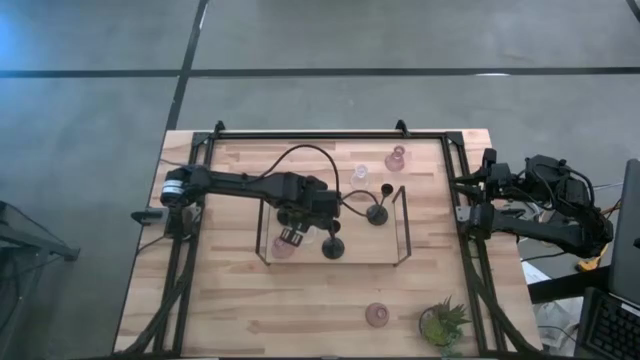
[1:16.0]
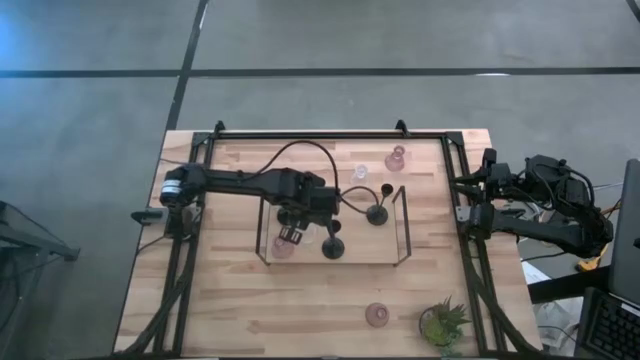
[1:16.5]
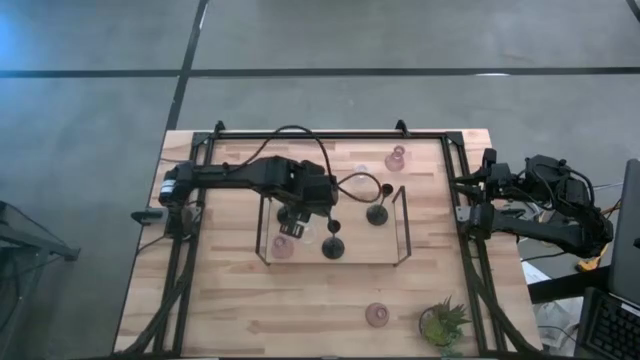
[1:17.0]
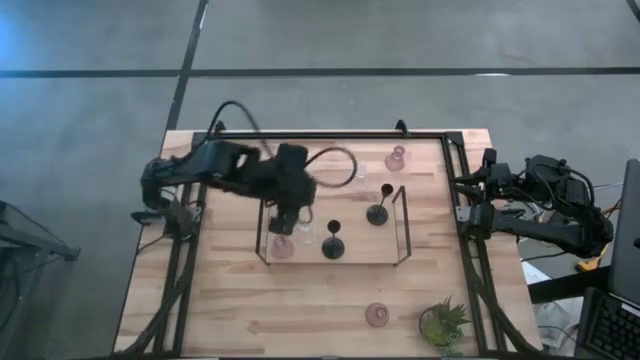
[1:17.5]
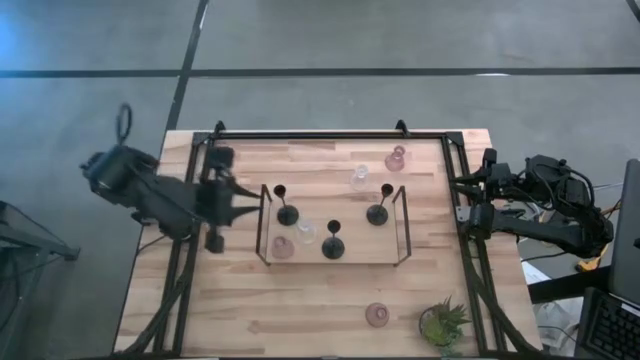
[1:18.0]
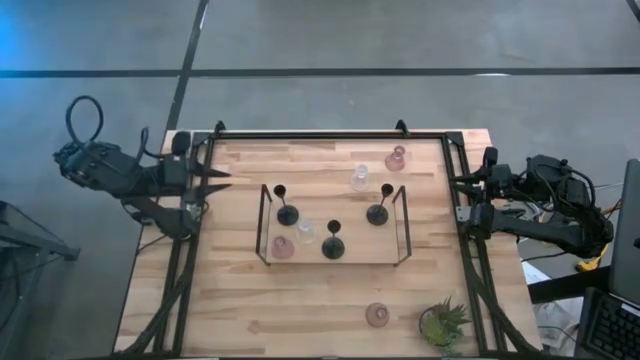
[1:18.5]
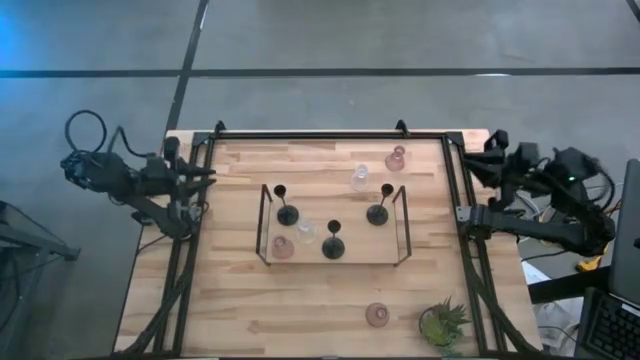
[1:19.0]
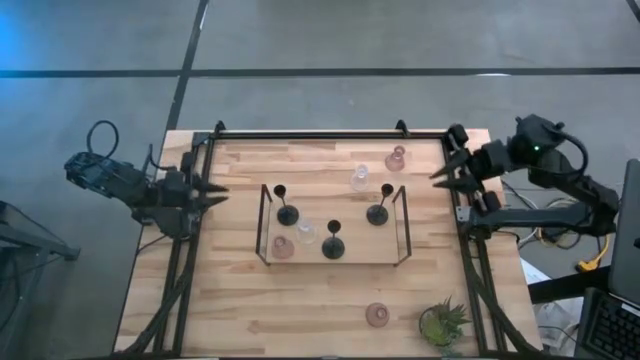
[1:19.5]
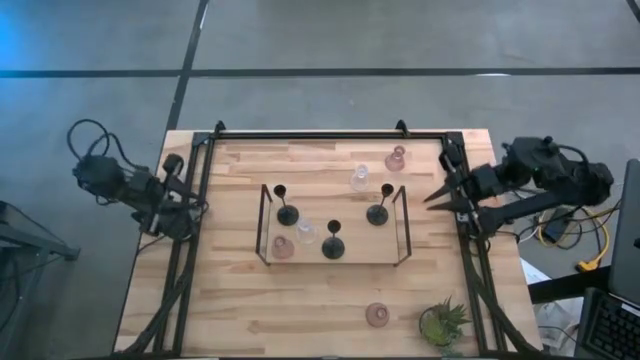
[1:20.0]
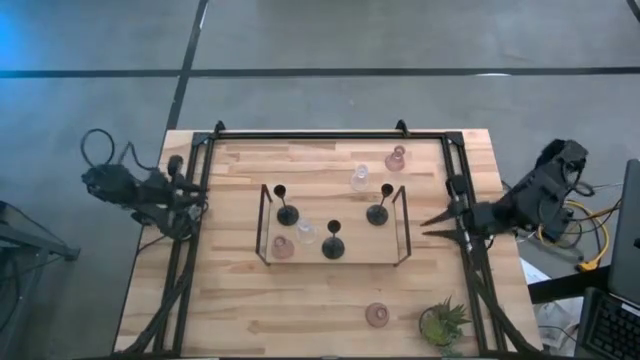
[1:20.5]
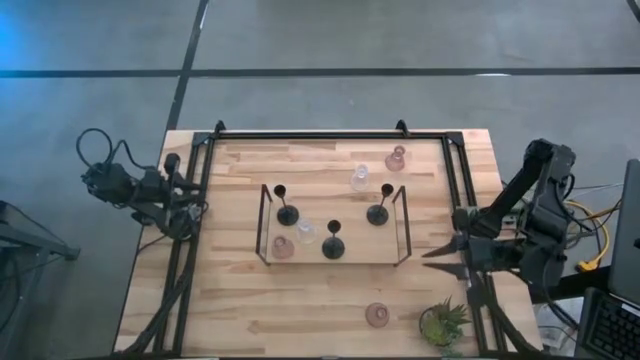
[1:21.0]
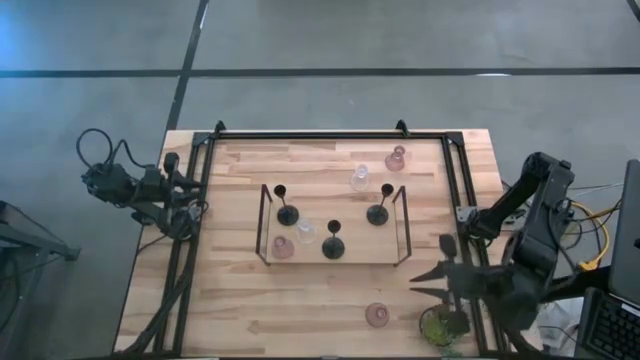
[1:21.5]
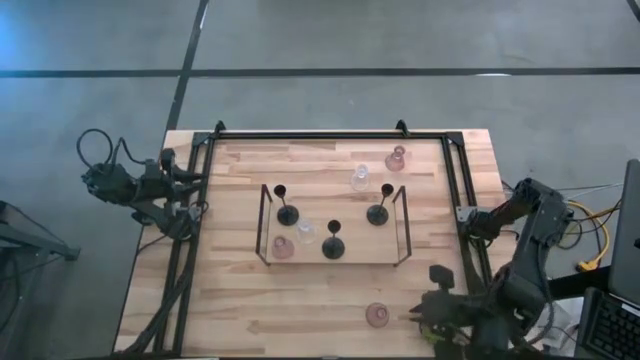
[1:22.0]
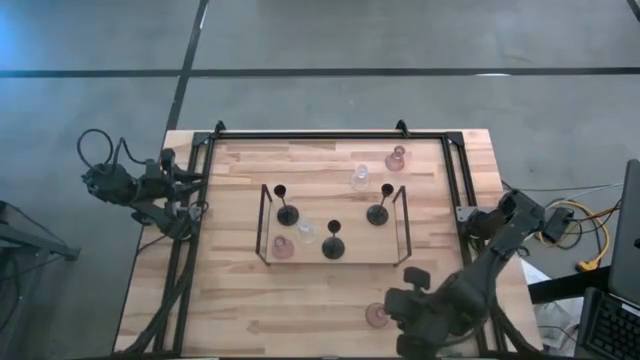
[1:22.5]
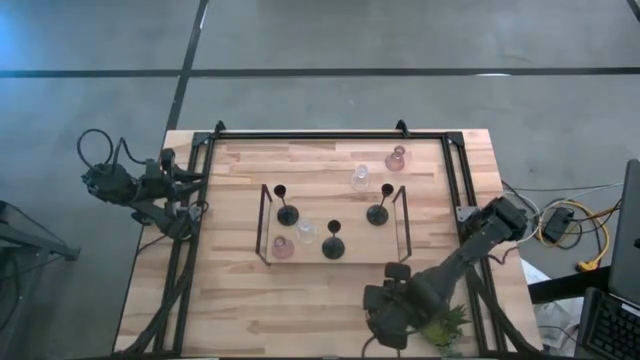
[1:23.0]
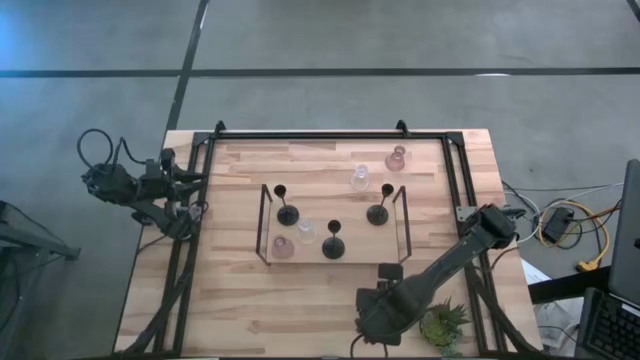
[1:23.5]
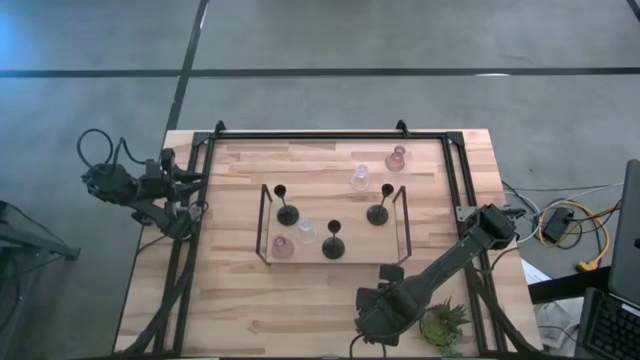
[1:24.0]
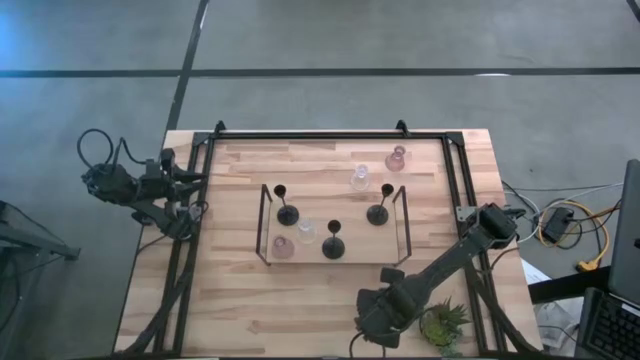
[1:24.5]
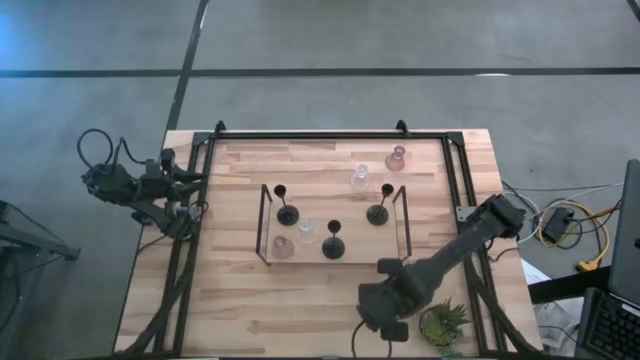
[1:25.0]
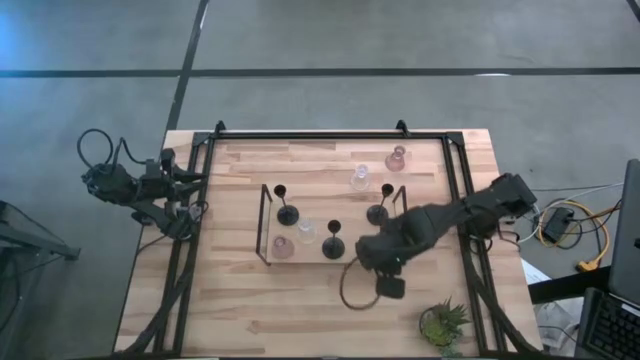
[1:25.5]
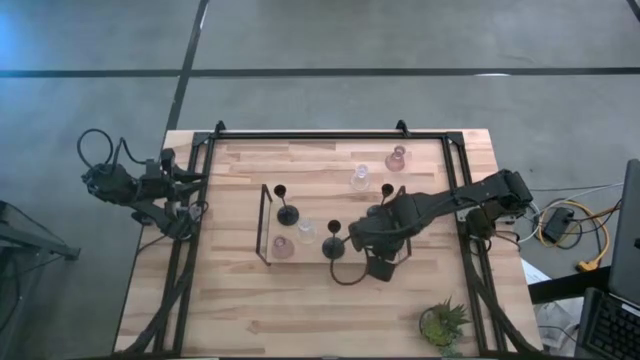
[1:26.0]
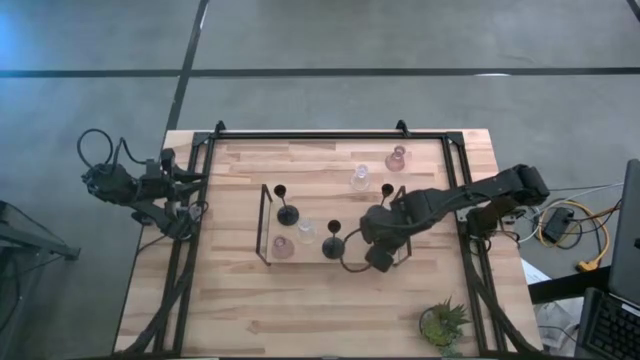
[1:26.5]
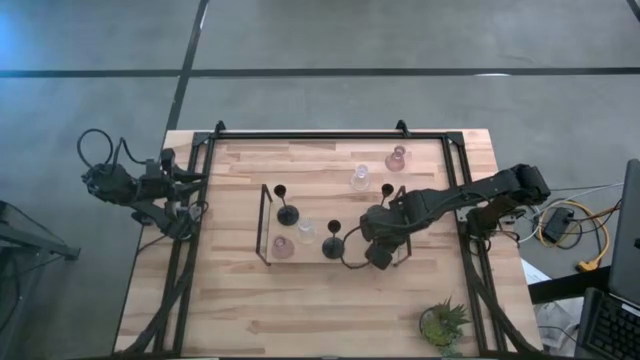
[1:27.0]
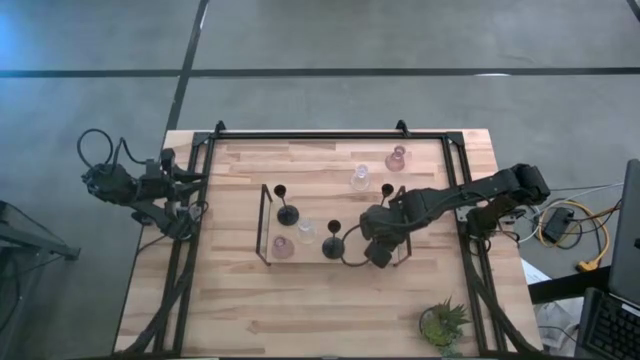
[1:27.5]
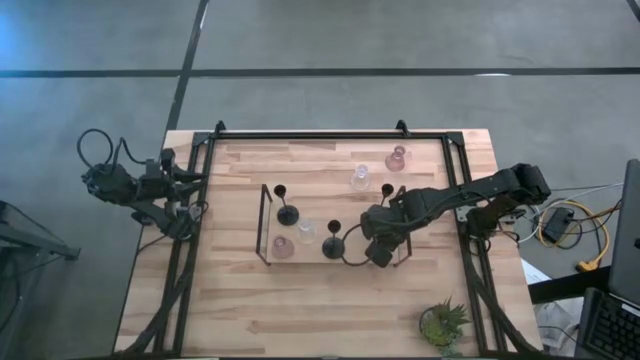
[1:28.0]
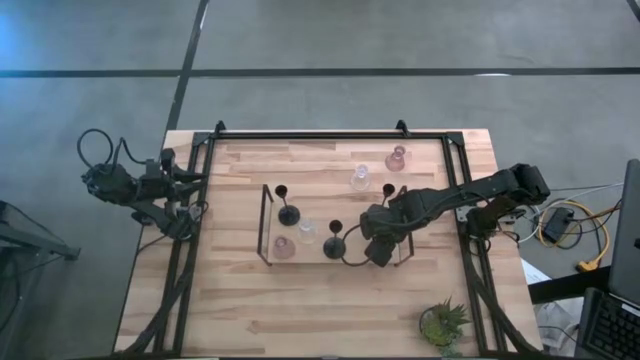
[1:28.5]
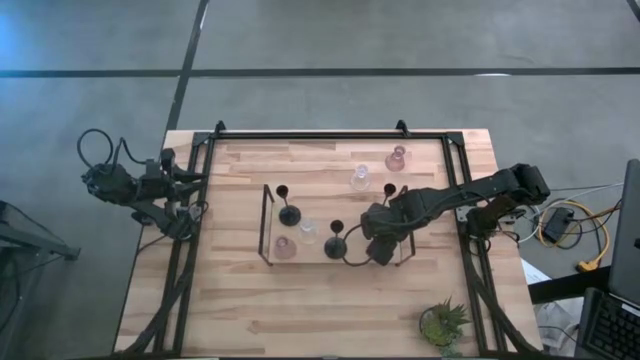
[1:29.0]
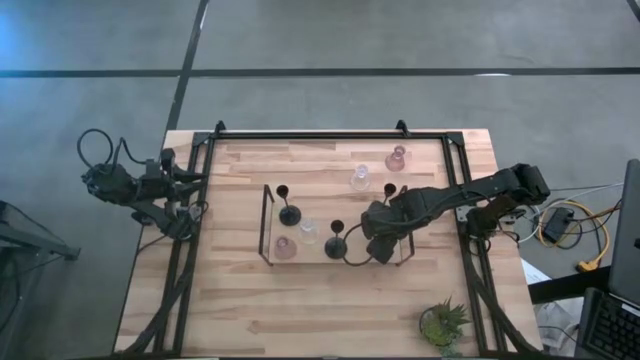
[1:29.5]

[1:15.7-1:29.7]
Task: Pick & Place candle stick holders
Put the bottom pink glass candle holder on the shelf

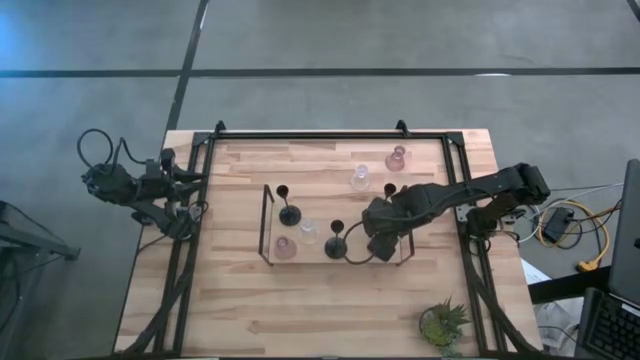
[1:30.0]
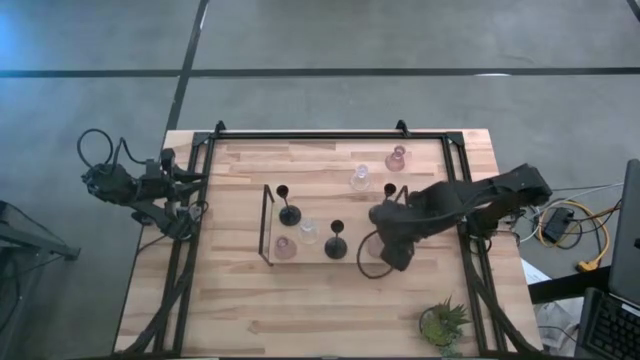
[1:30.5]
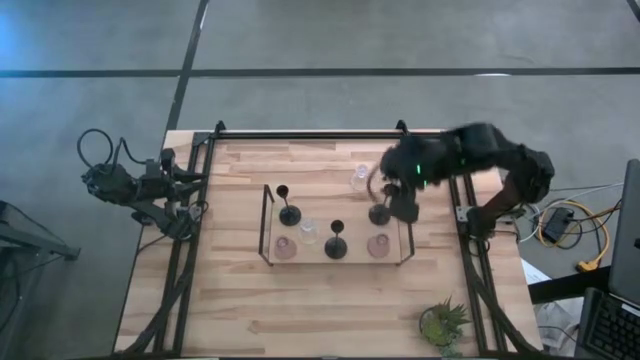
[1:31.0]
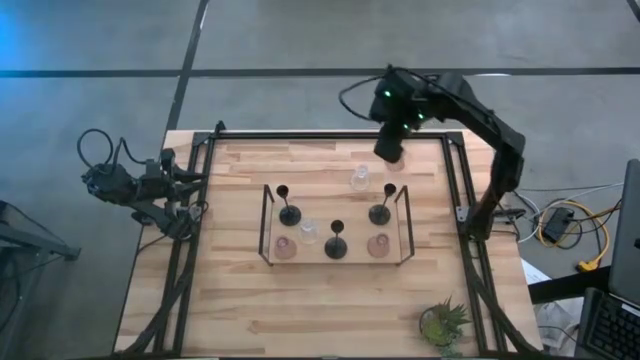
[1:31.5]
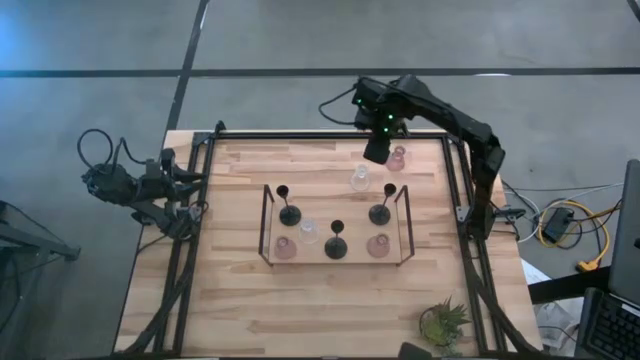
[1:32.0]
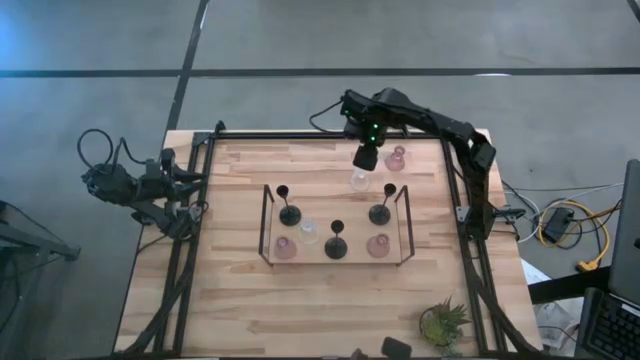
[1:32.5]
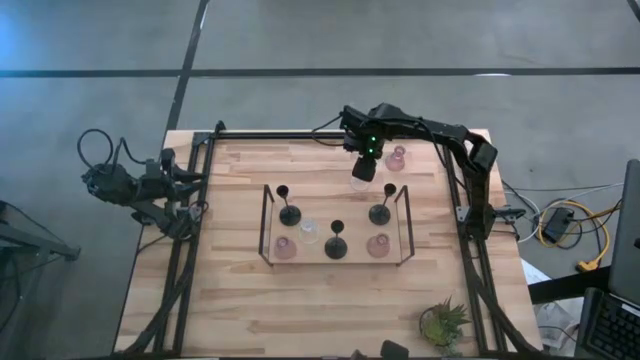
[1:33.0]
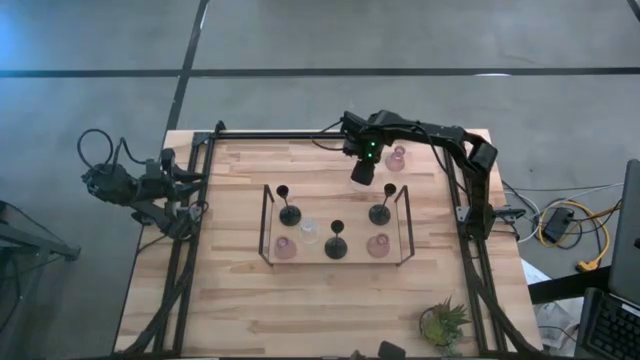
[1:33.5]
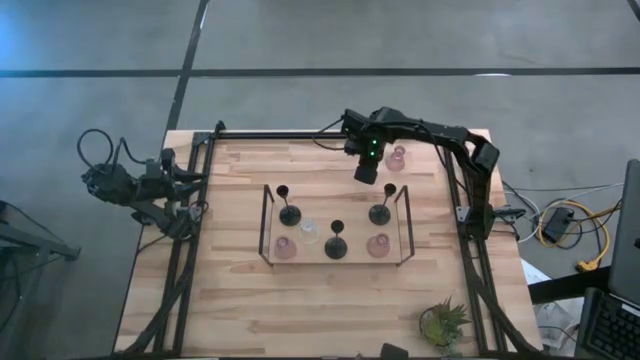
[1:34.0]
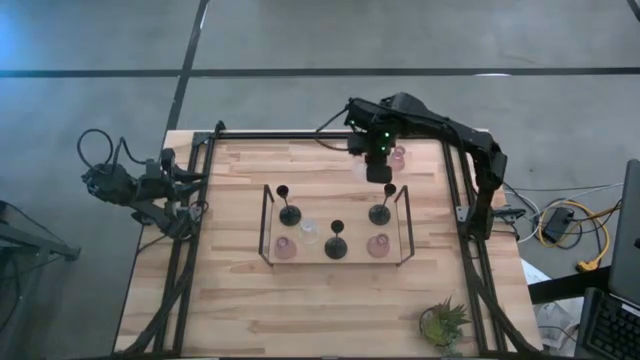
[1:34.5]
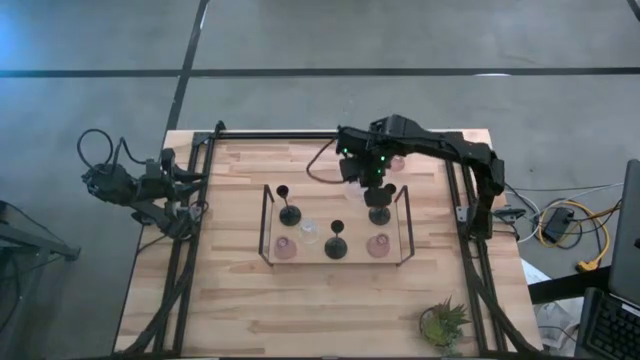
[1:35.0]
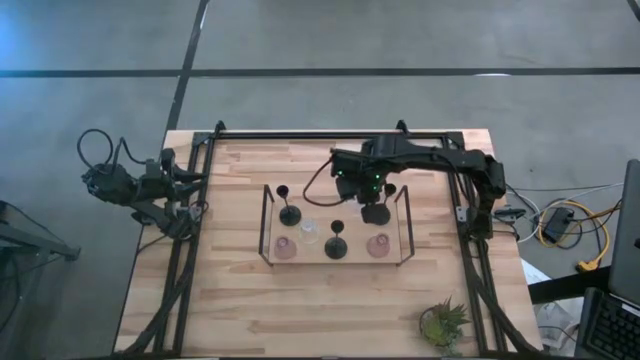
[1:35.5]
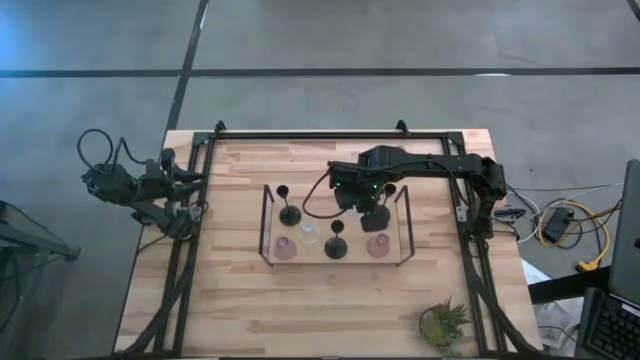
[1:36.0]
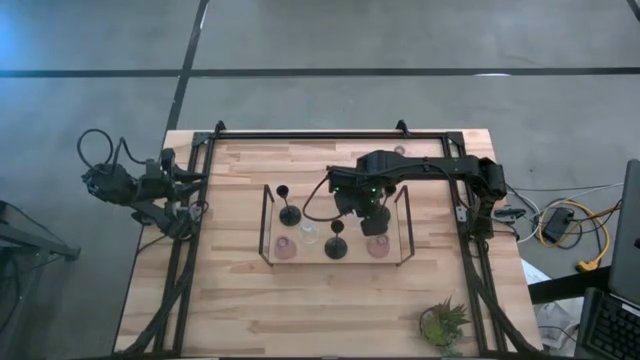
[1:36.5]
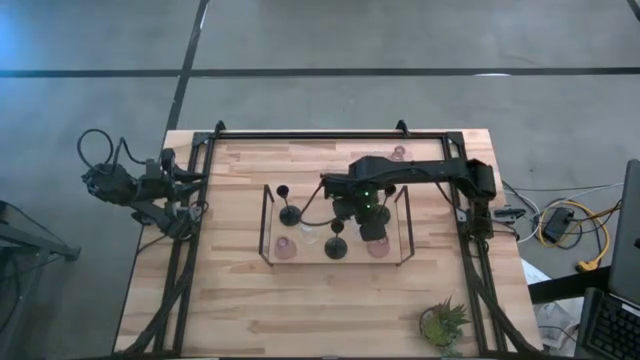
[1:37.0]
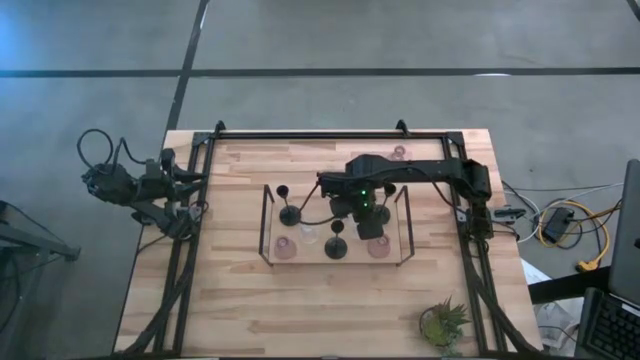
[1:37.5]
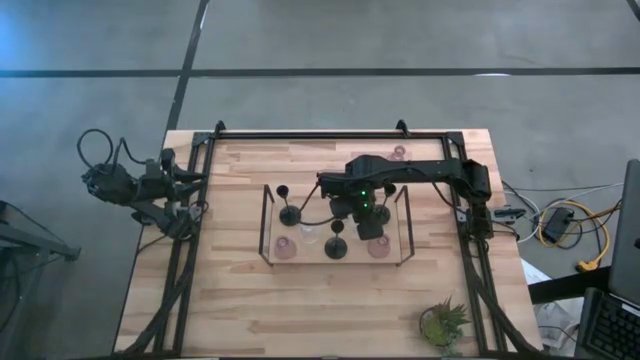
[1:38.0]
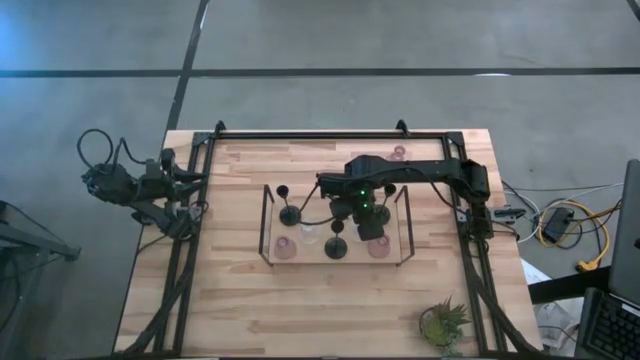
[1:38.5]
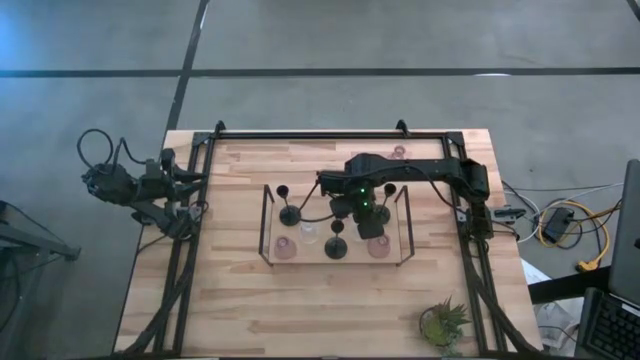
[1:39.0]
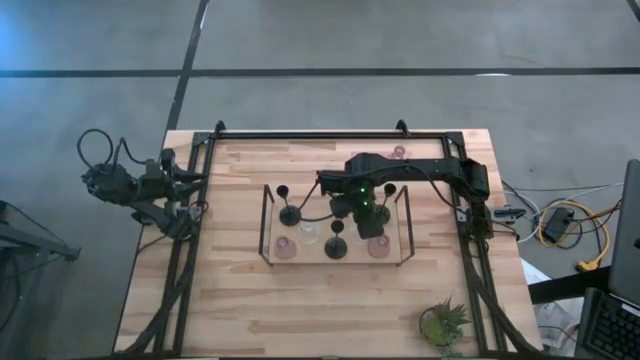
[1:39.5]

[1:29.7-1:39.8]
Put the transparent glass candle holder on the shelf
